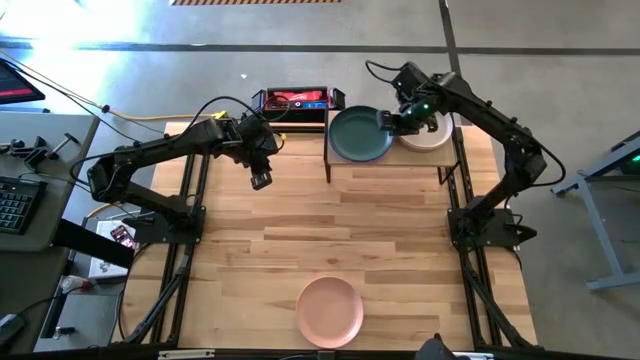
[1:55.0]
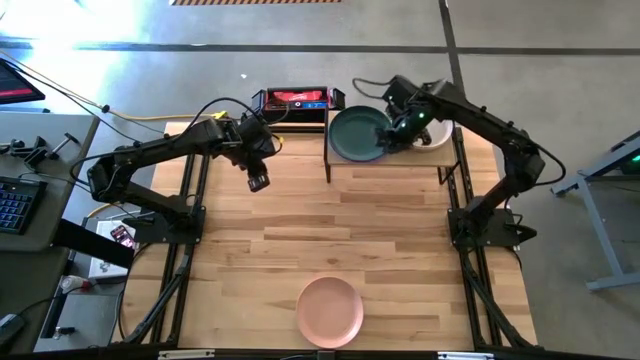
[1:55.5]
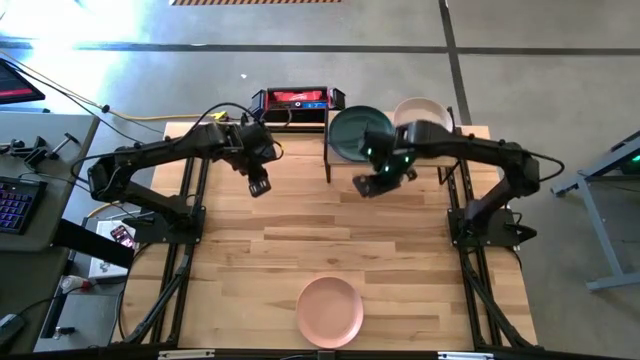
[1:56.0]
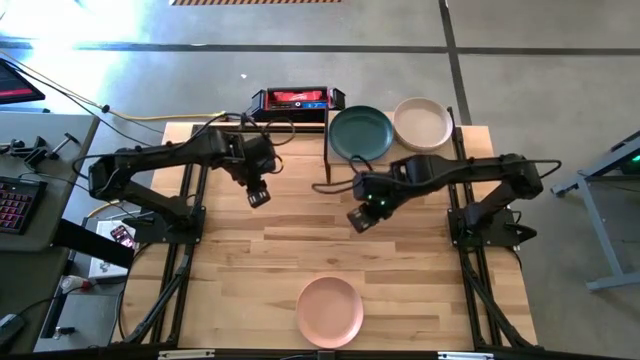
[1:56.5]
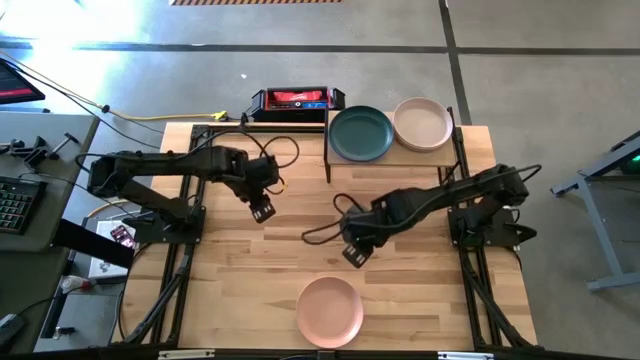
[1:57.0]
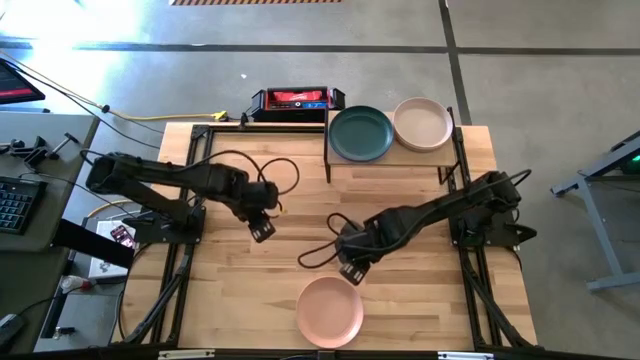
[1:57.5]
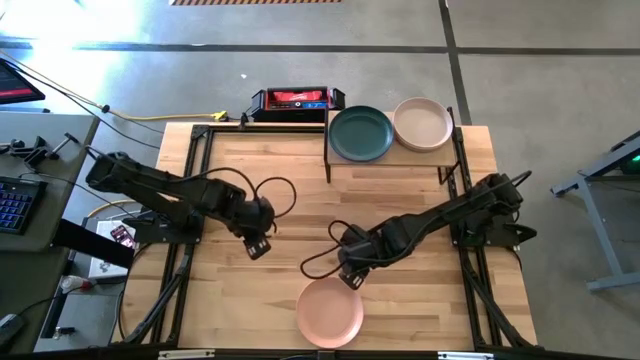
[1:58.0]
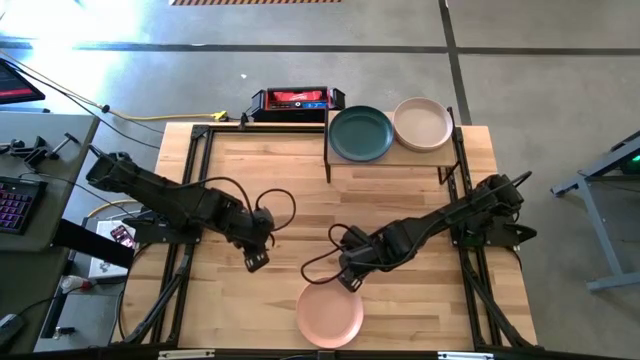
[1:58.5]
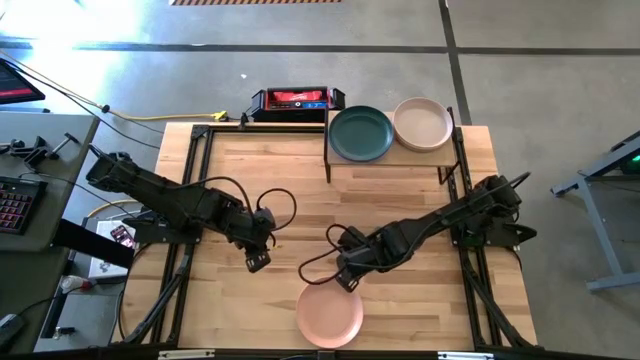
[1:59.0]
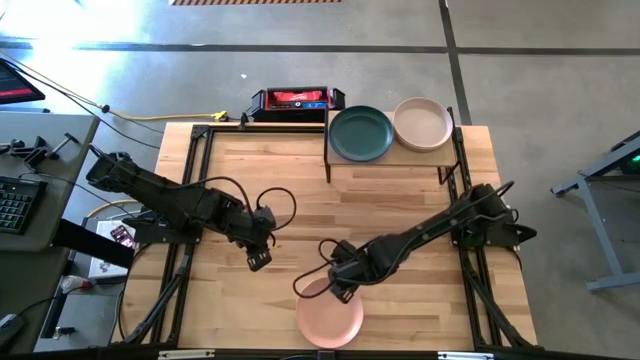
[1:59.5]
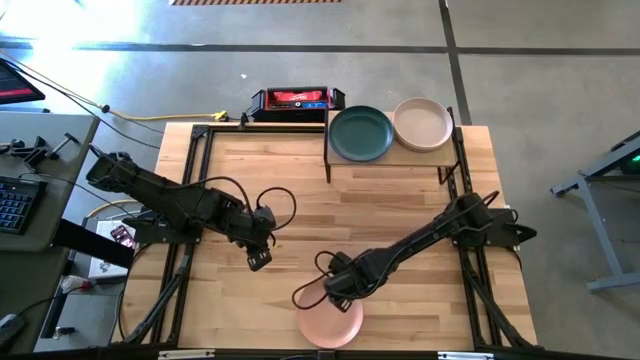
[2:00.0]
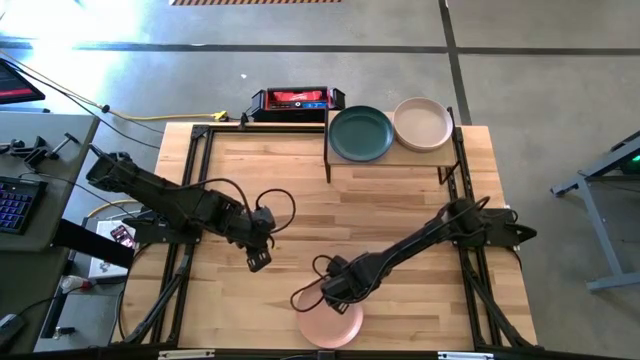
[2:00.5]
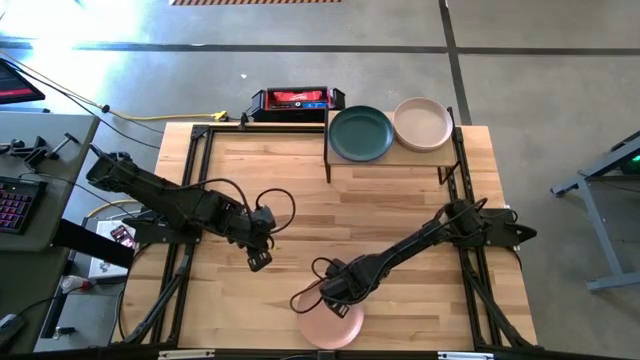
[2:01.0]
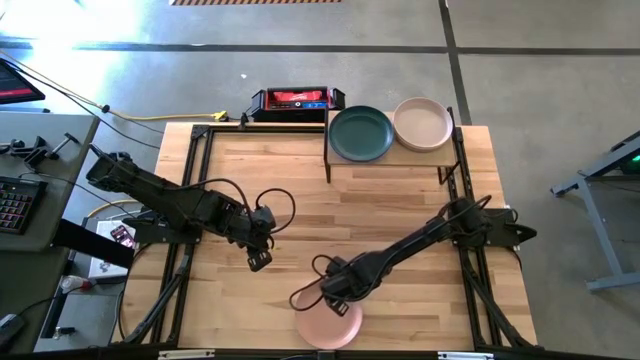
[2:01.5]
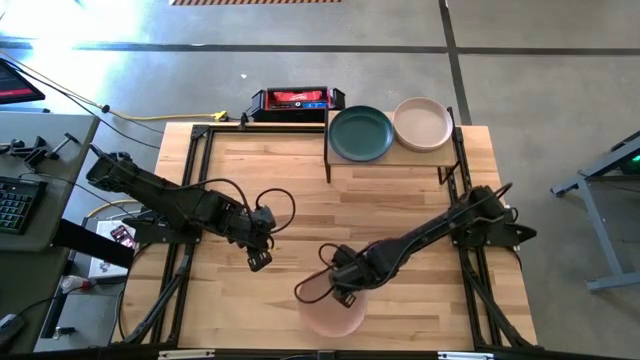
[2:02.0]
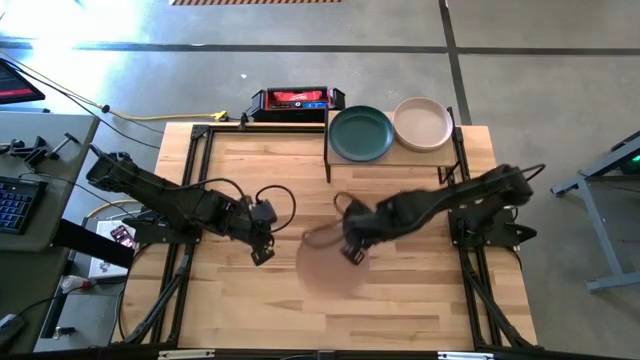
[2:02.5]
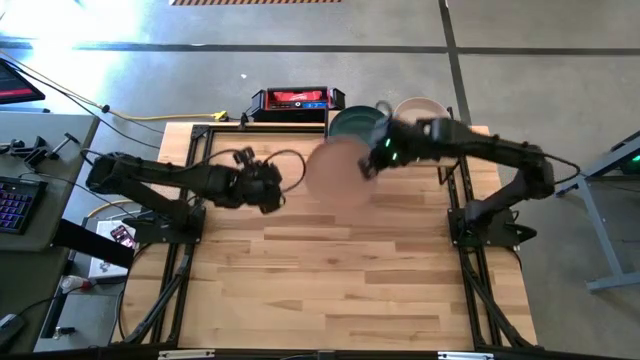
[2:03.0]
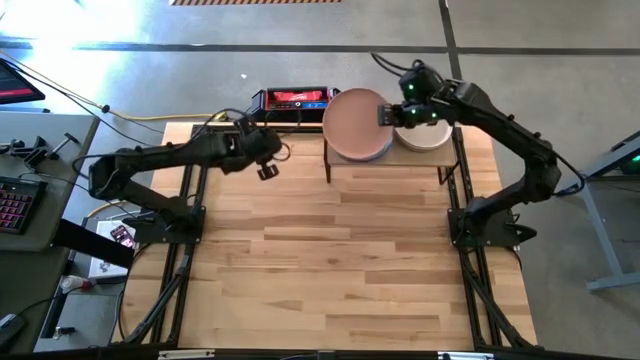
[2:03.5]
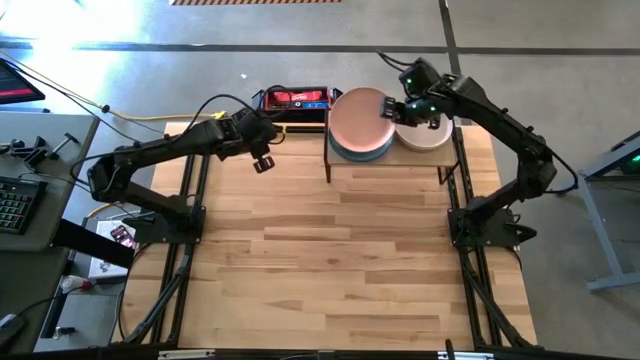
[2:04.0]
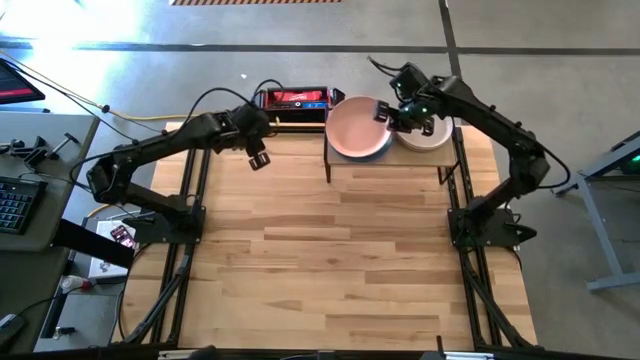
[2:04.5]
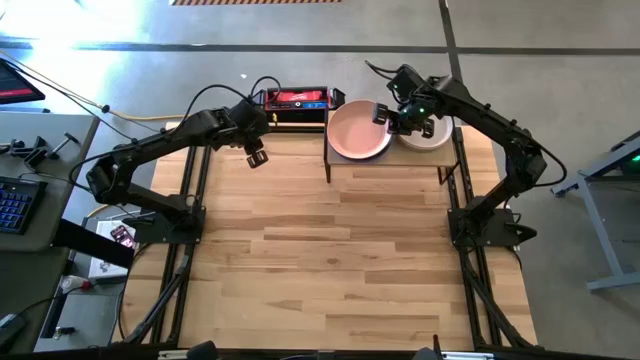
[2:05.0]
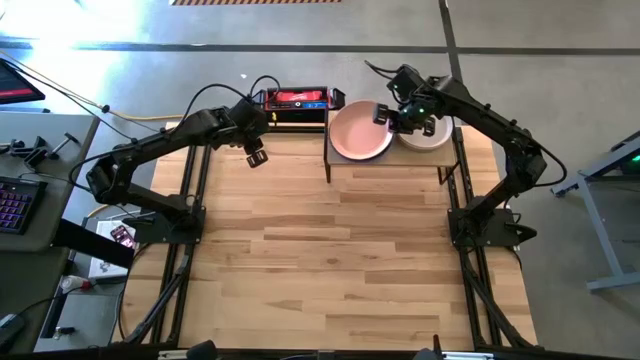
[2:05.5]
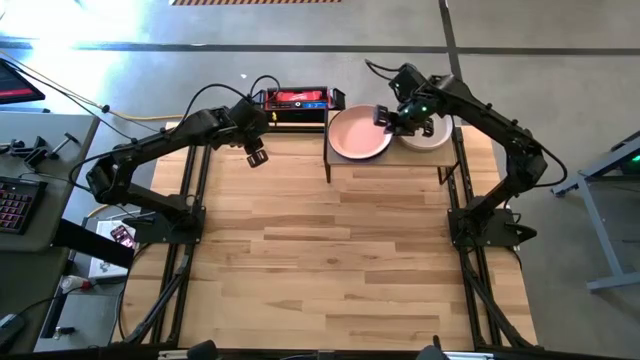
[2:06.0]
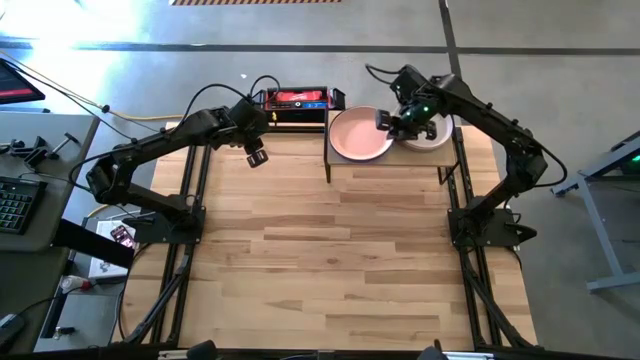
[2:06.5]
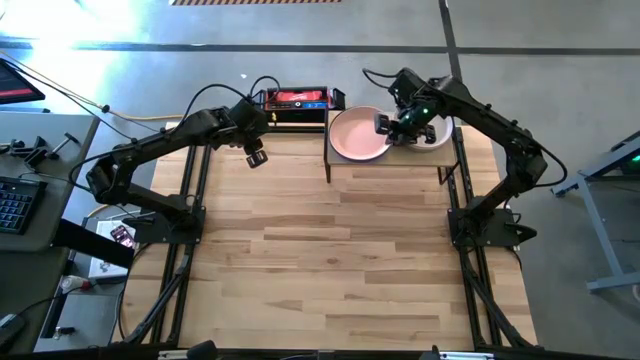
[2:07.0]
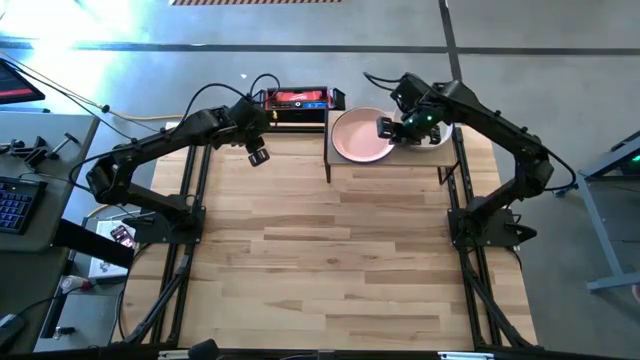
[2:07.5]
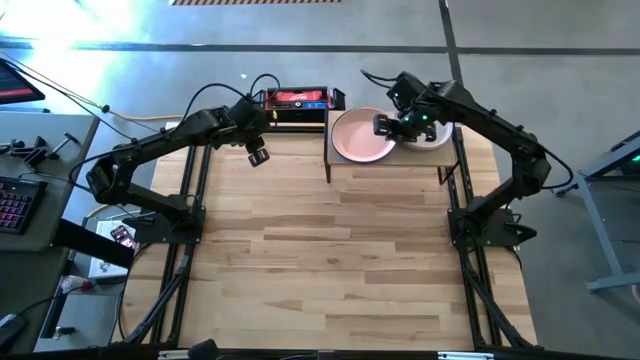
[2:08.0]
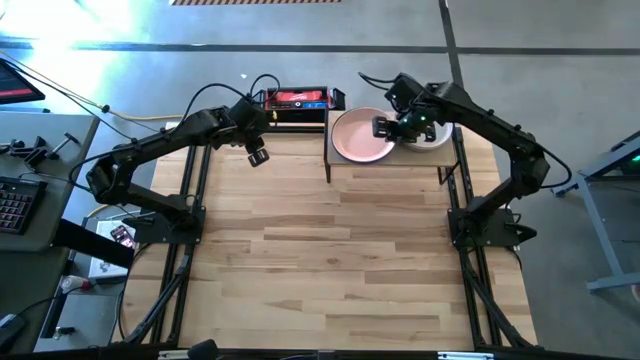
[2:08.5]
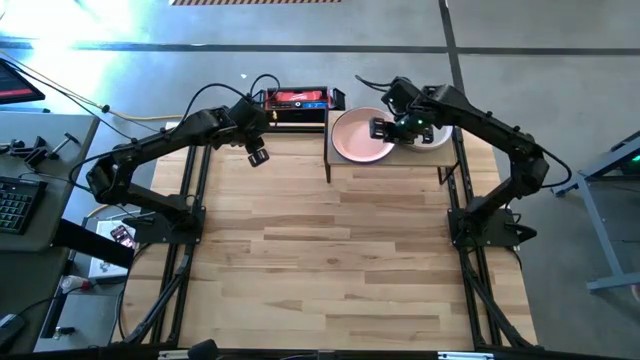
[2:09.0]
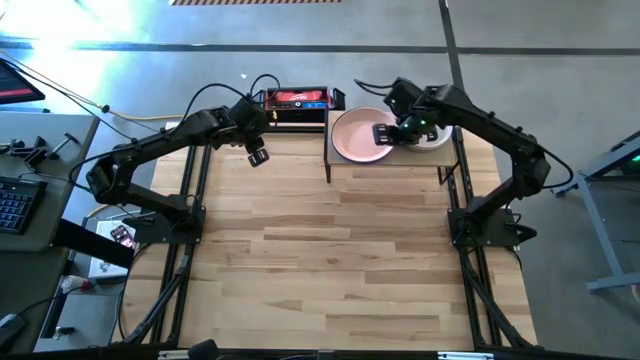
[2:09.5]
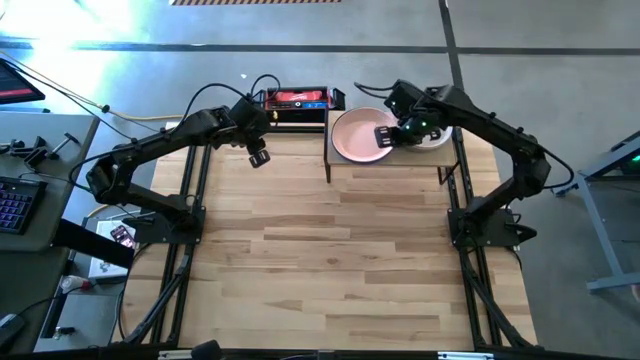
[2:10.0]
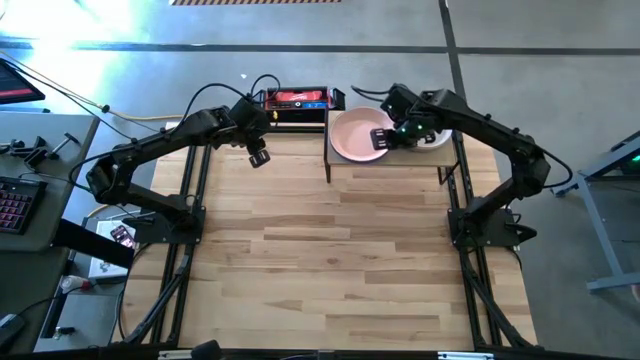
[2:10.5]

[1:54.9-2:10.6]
Task: Place and stack plates onto a shelf
Stack the pink plate on top of the green plate on the shelf

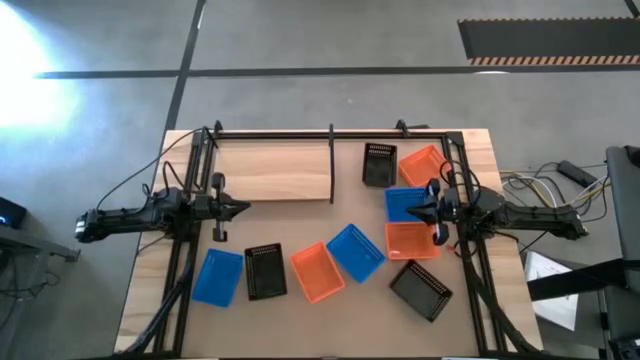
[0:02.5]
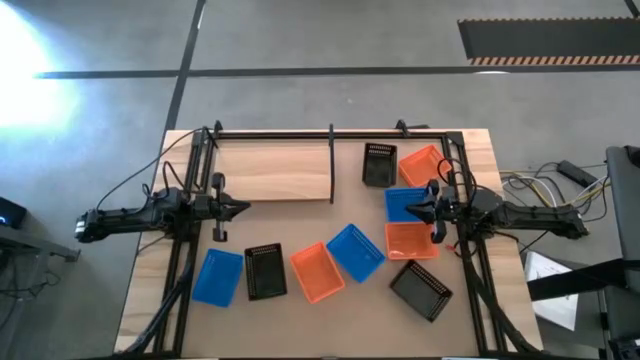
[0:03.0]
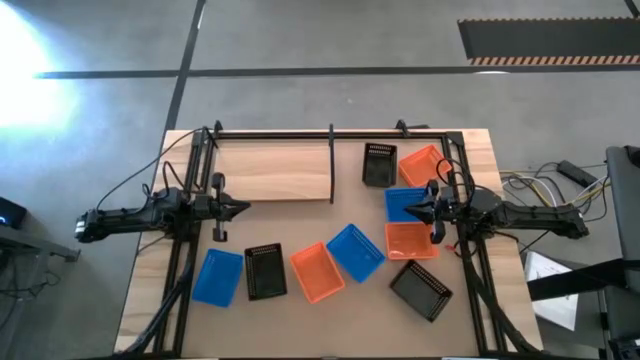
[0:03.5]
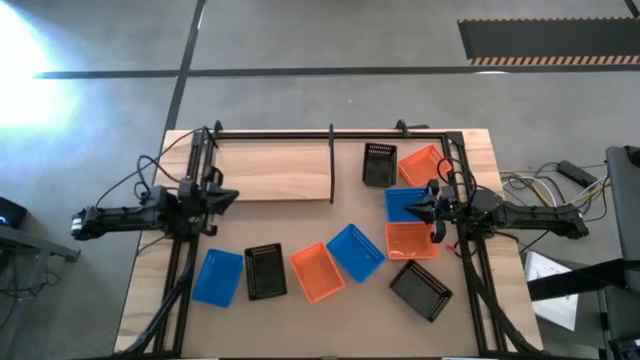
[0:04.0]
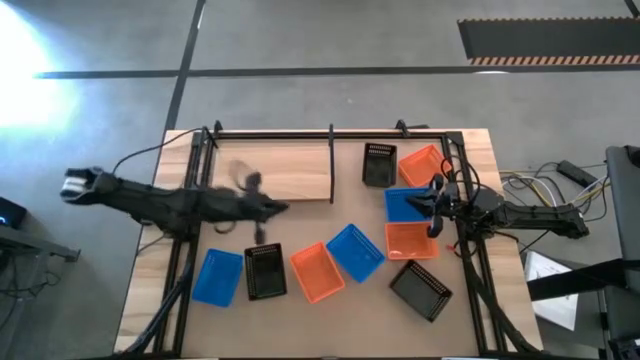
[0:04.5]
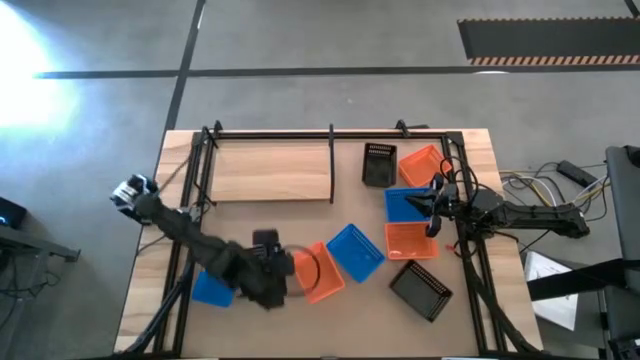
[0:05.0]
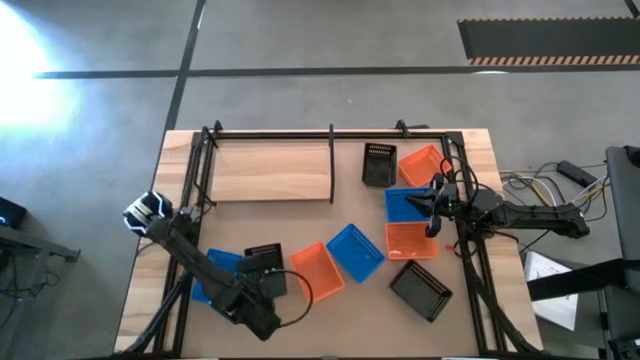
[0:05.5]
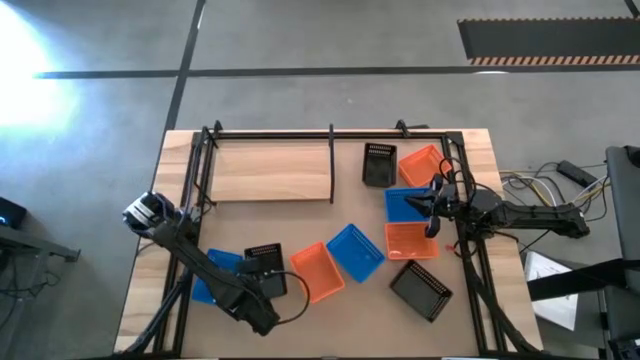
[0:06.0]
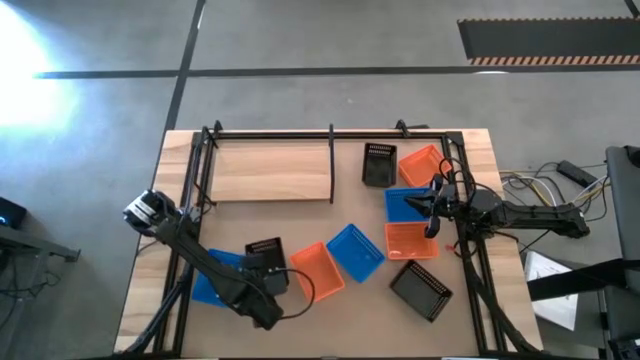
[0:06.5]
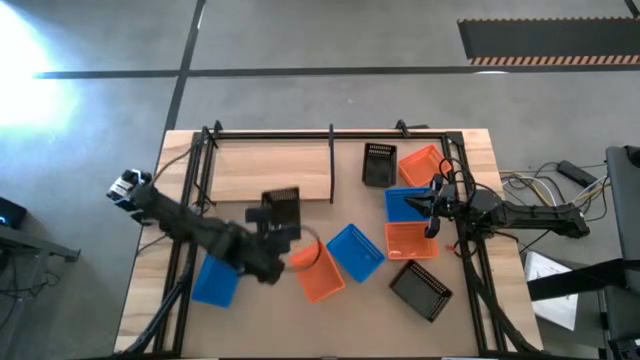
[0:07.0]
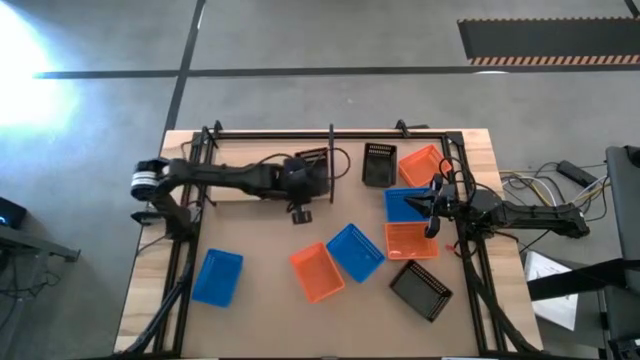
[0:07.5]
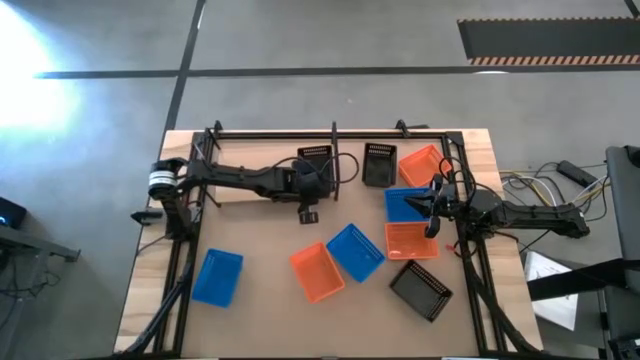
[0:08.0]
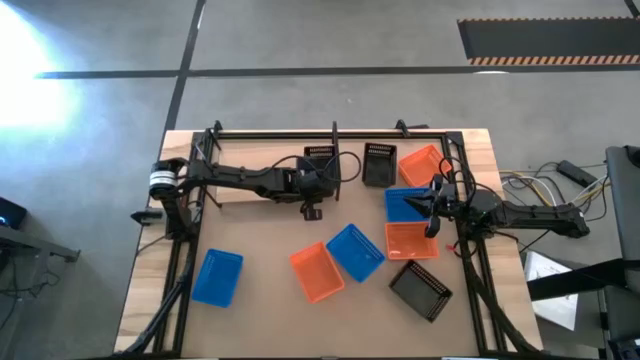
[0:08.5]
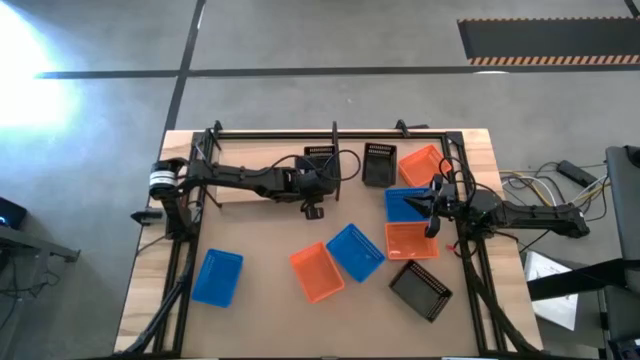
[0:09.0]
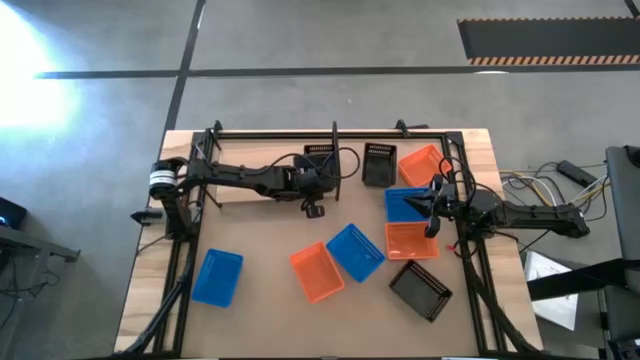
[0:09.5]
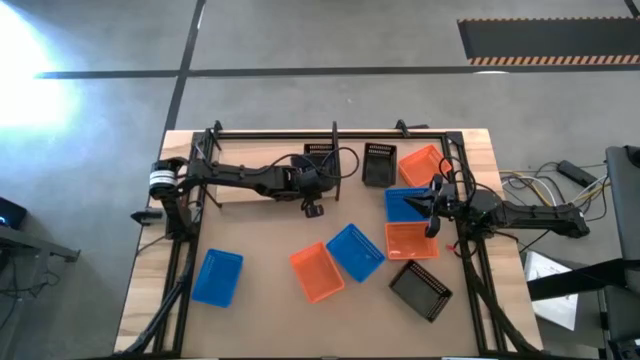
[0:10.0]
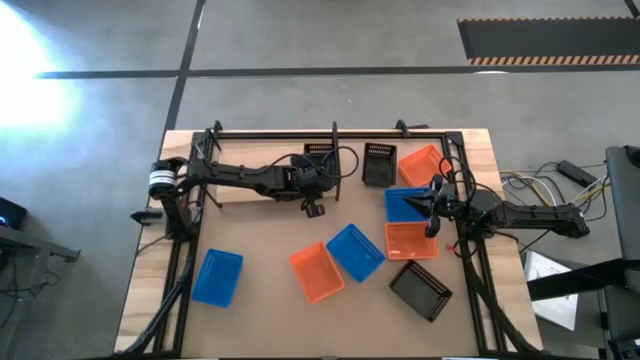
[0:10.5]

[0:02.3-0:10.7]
Task: Stack baskets on shelf by color
Put the bottom left black basket on the shelf
